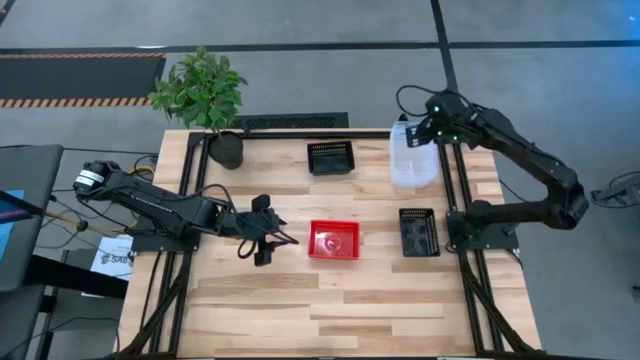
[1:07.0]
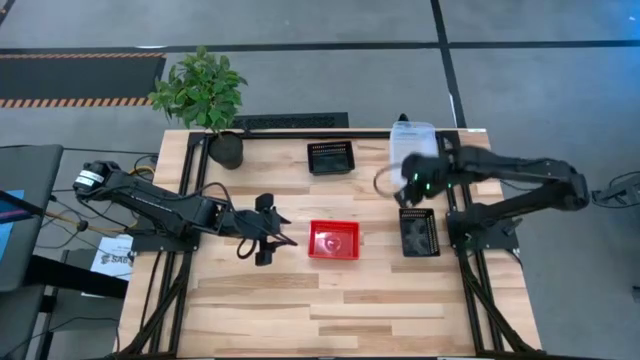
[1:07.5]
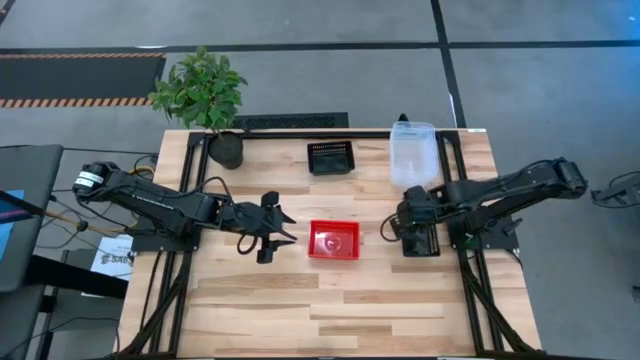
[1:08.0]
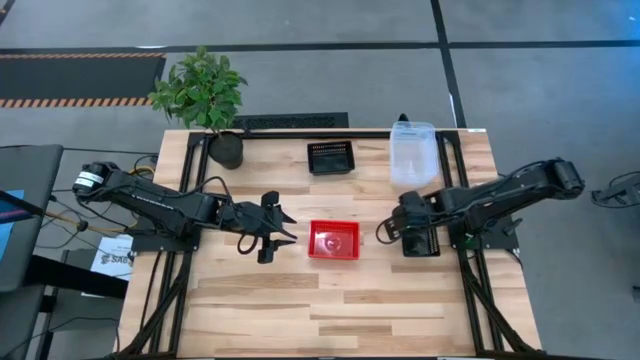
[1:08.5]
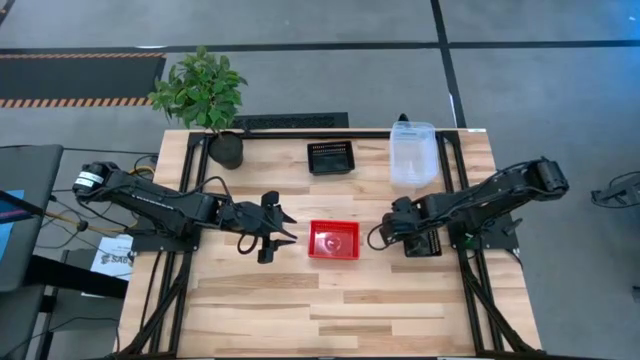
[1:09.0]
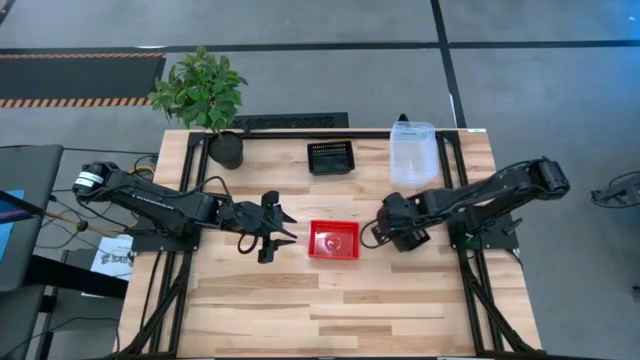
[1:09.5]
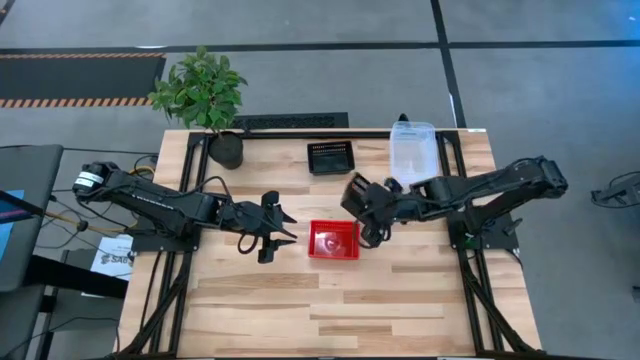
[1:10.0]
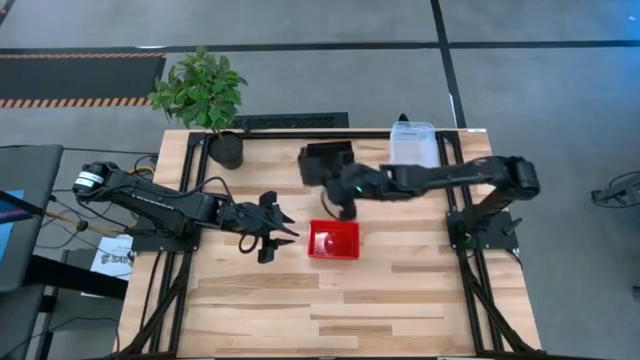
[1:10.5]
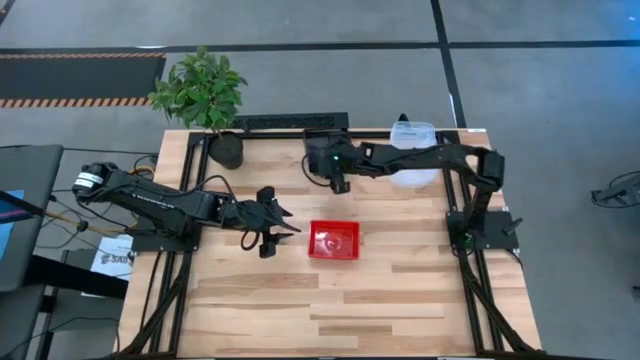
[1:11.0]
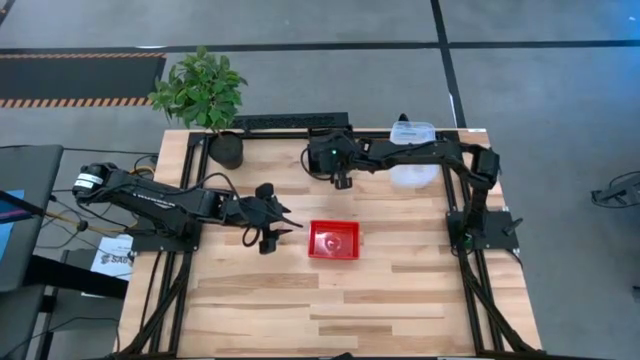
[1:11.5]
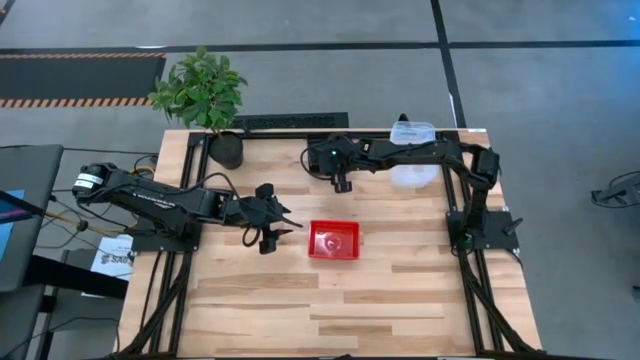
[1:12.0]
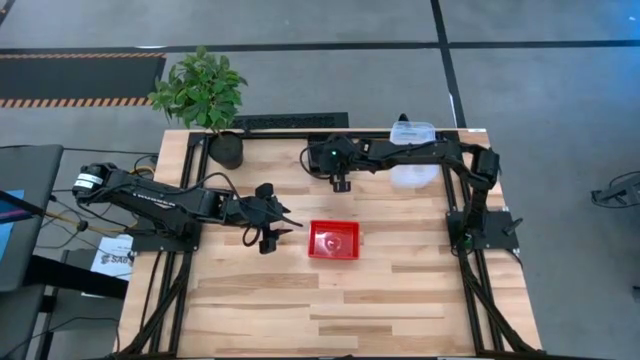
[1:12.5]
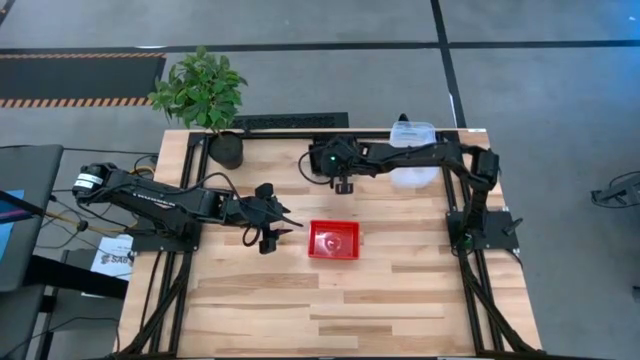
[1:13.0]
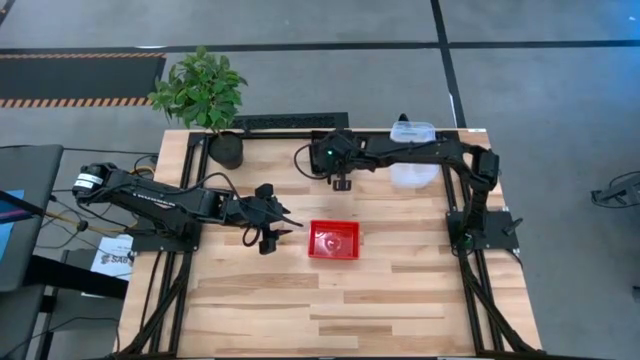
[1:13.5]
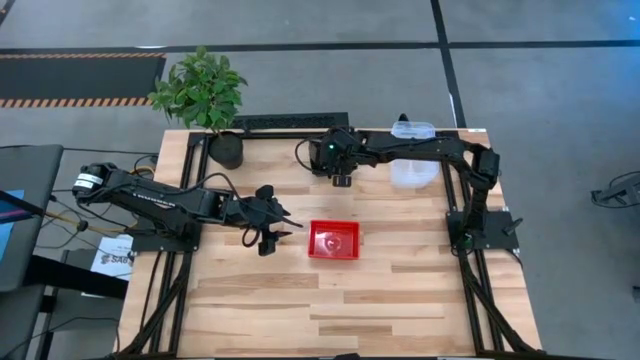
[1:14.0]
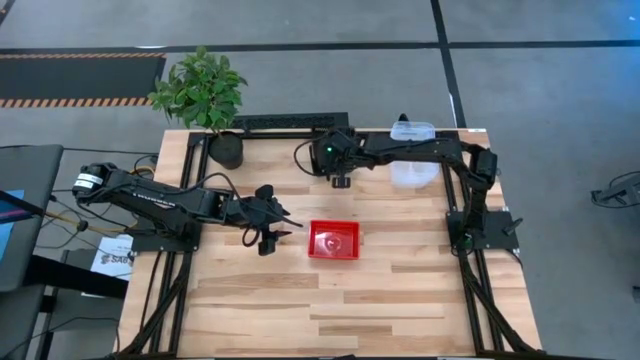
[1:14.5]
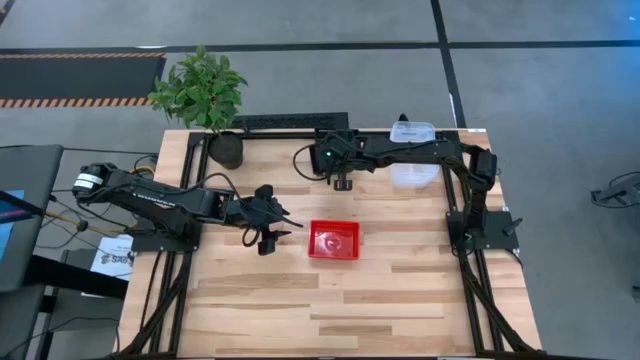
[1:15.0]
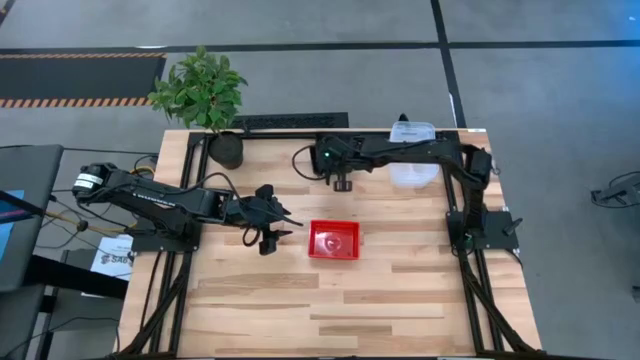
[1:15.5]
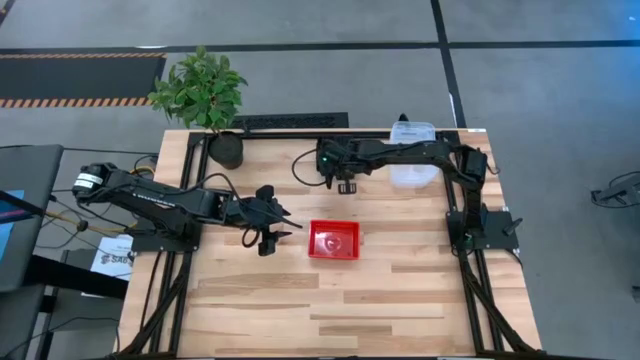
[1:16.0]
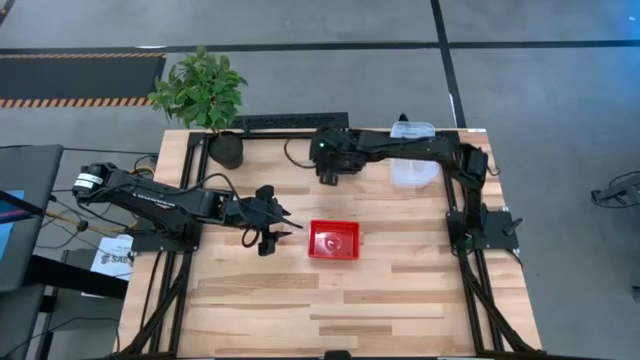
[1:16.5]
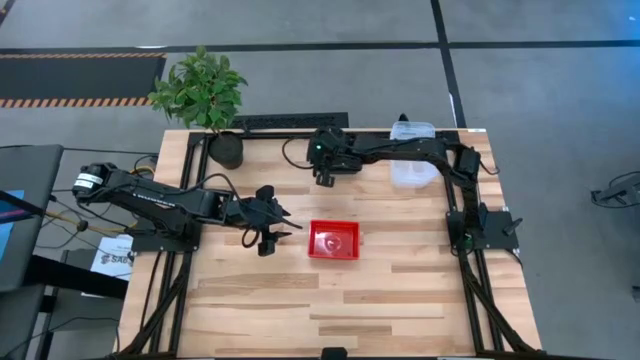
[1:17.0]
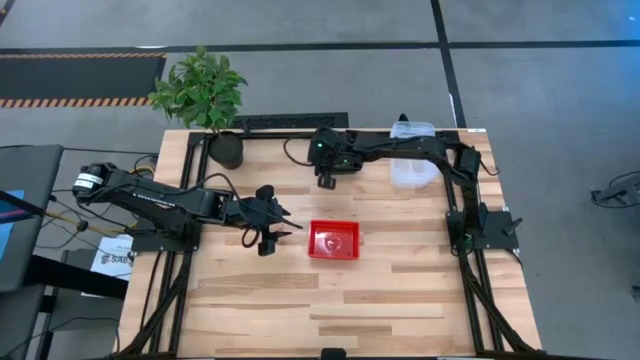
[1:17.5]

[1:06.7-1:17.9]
Stack the bottom black bin on top of the top black bin

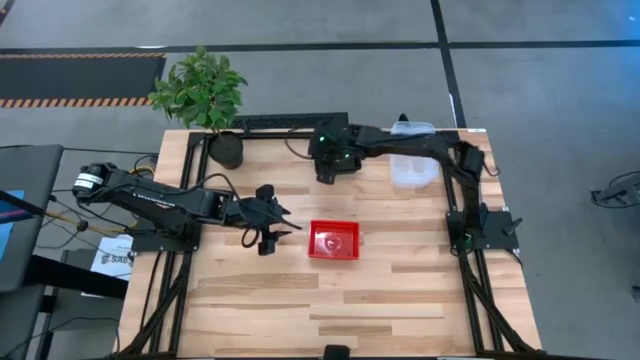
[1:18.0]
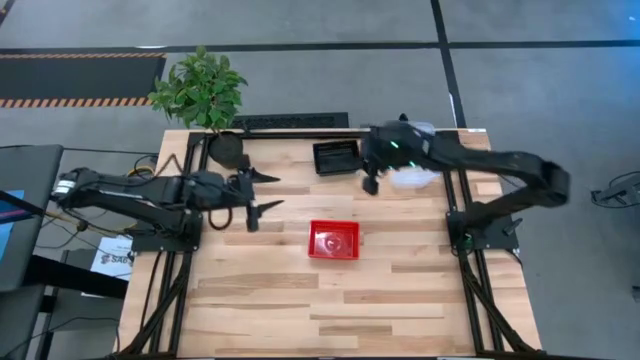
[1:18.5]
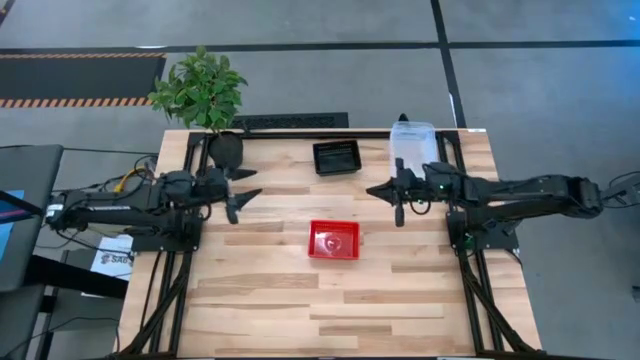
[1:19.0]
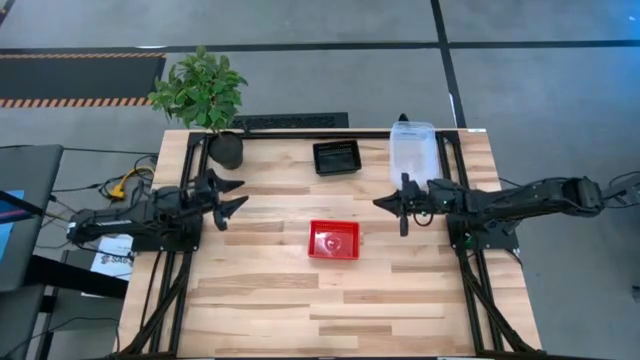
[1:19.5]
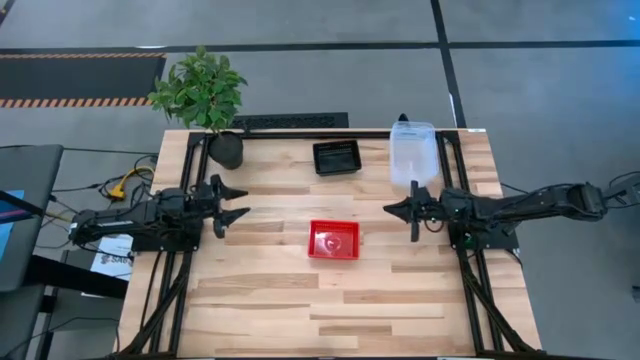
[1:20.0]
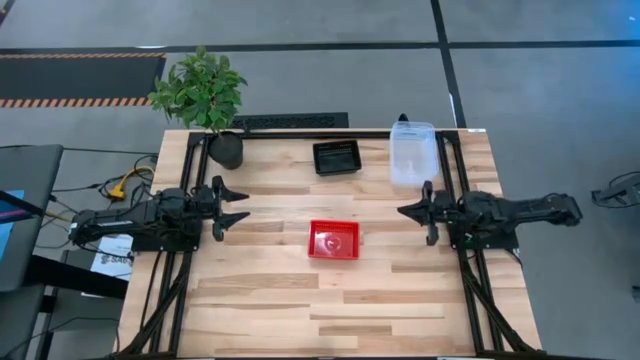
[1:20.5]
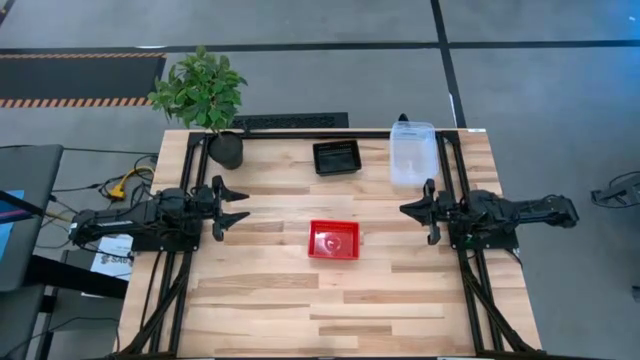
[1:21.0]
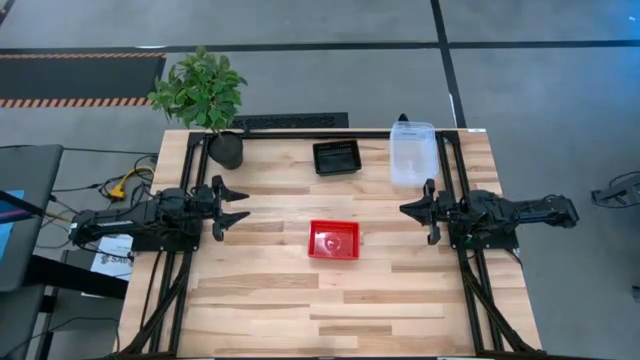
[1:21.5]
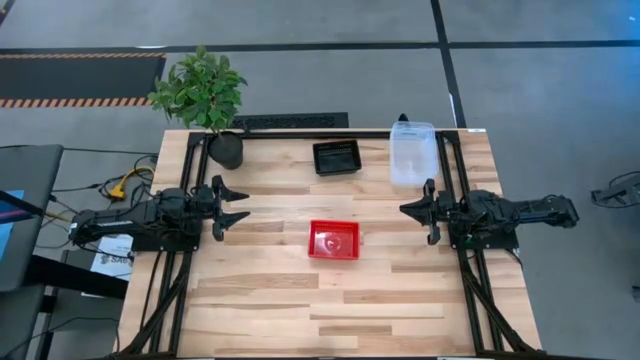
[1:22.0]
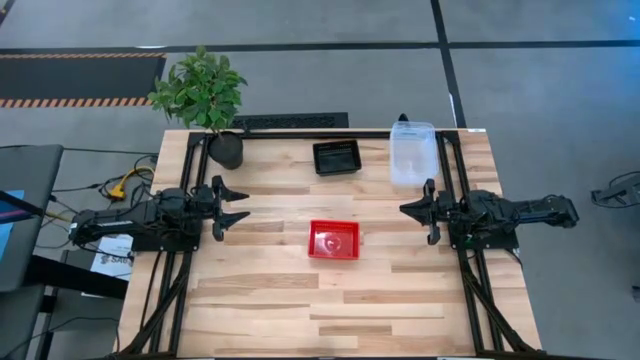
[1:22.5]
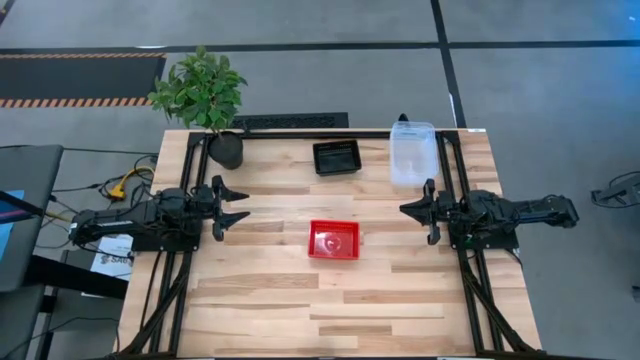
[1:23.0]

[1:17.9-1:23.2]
Return to Home Position

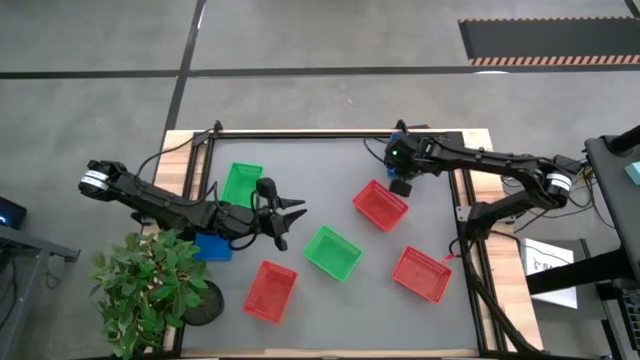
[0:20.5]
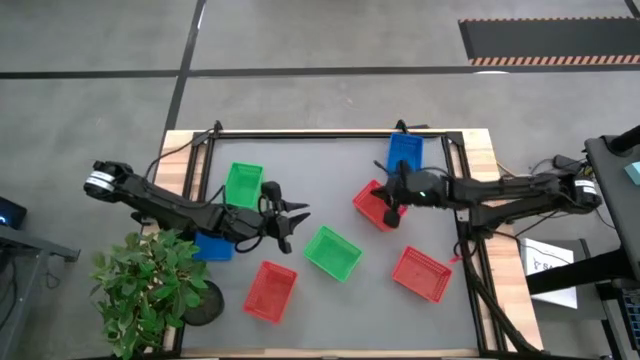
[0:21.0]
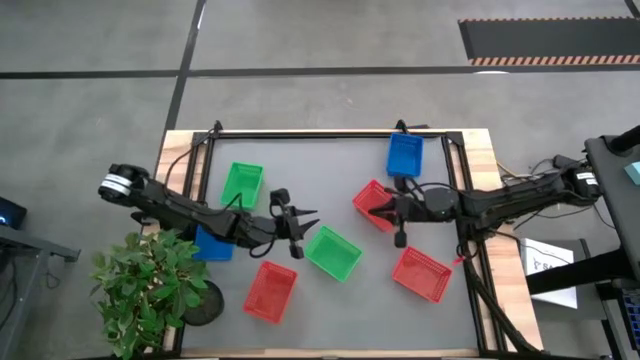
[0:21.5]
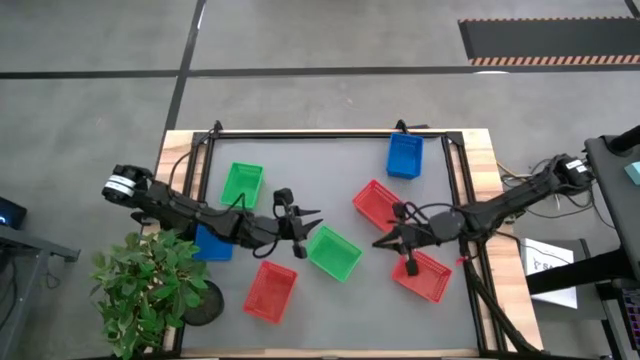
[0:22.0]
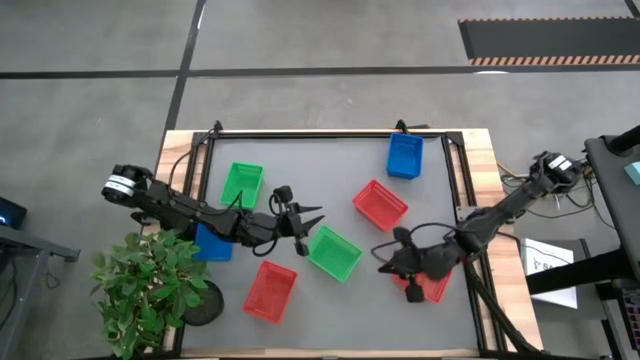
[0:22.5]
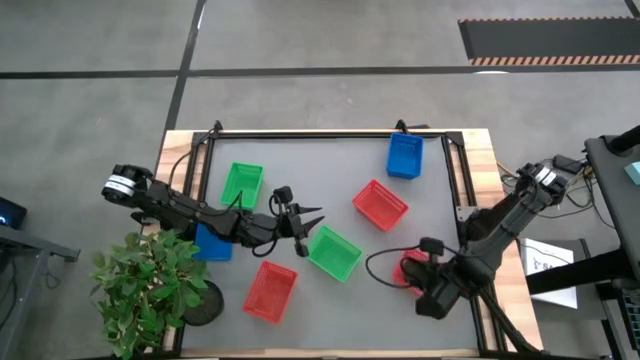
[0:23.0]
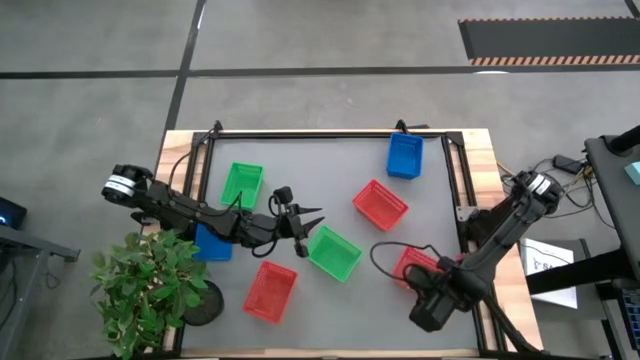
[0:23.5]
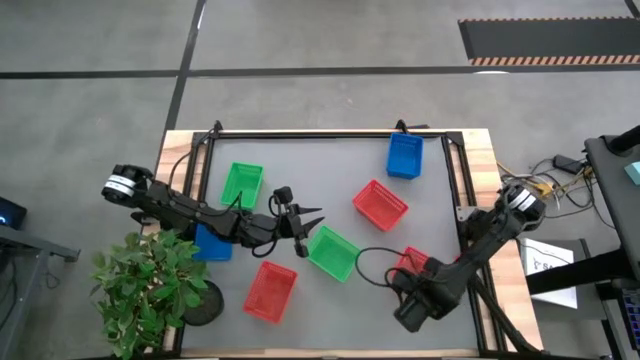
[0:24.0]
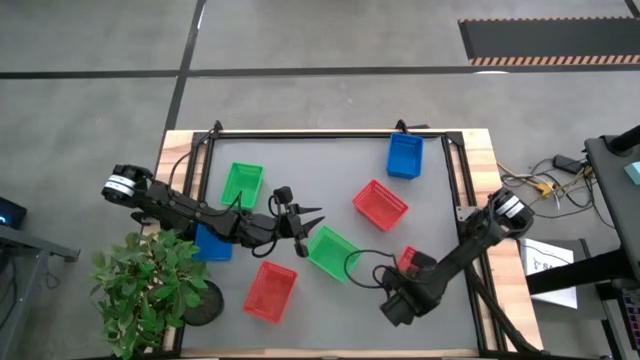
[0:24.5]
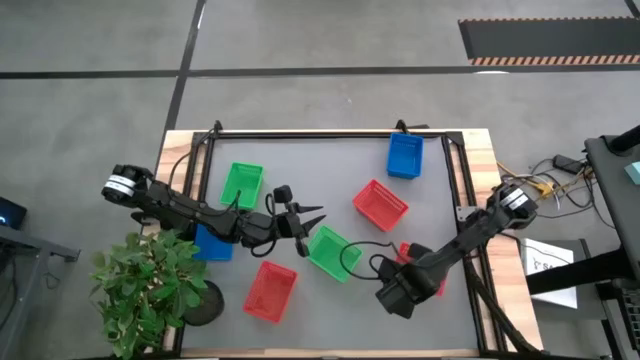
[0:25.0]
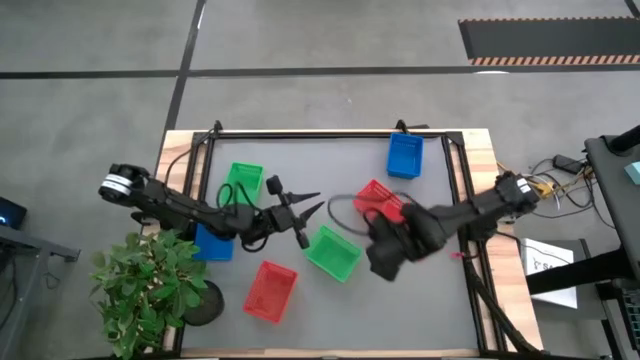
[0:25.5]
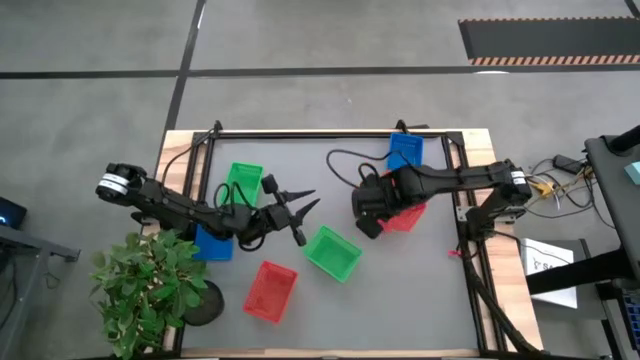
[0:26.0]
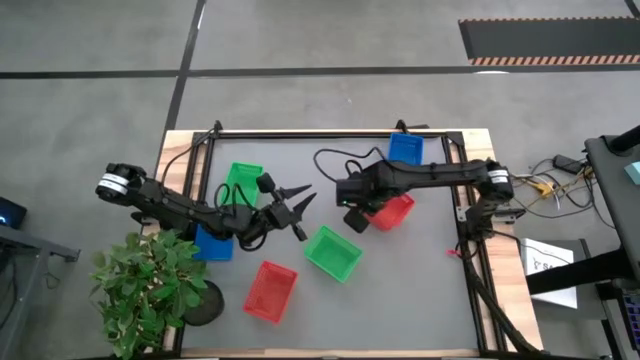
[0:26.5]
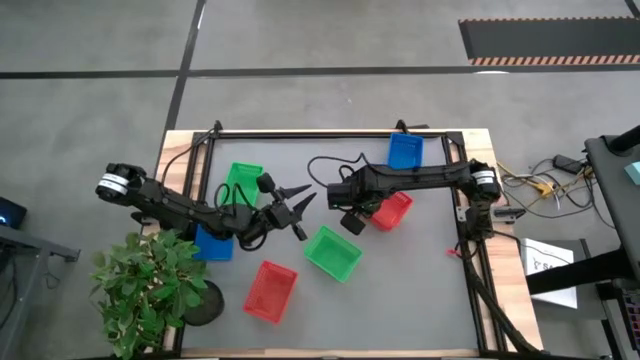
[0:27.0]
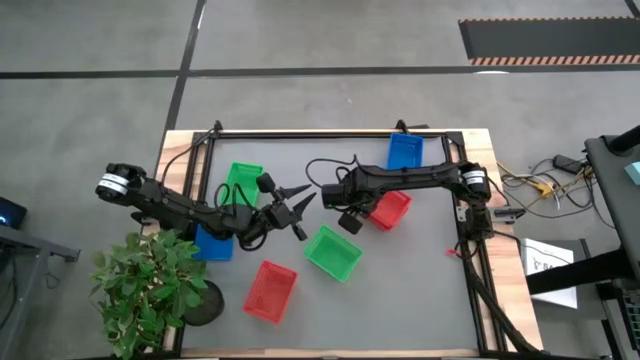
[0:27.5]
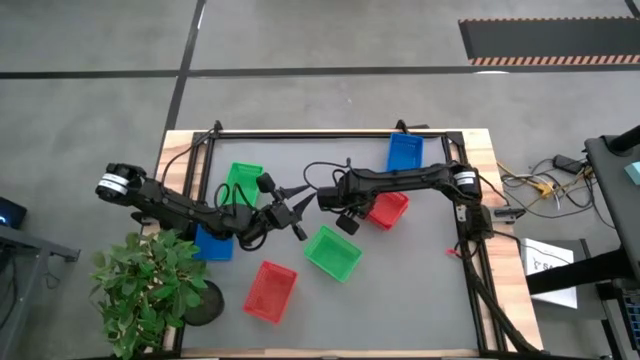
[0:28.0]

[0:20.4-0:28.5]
Stack the bottom right red basket on the top right red basket
